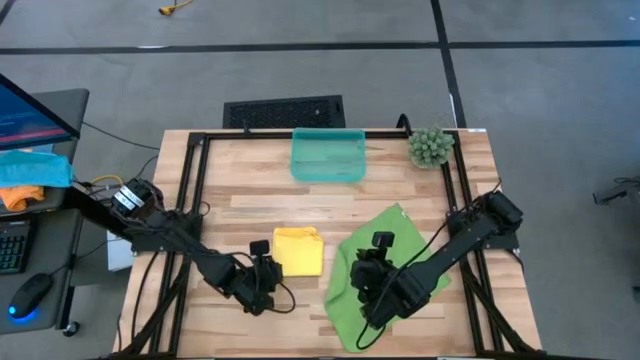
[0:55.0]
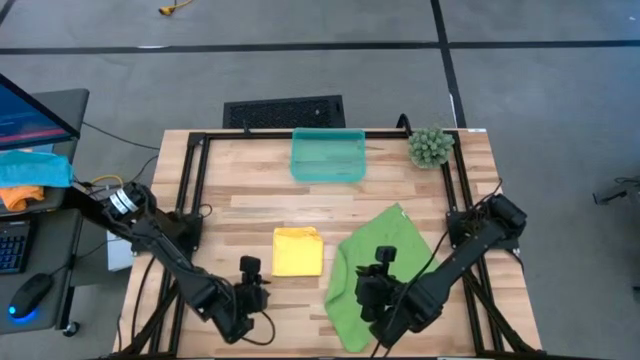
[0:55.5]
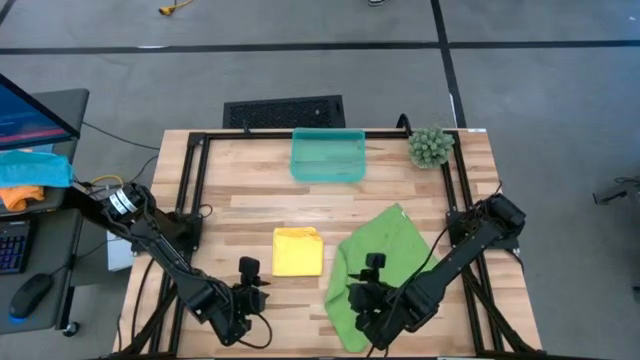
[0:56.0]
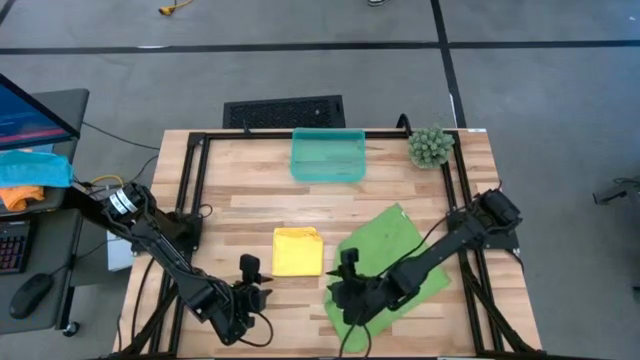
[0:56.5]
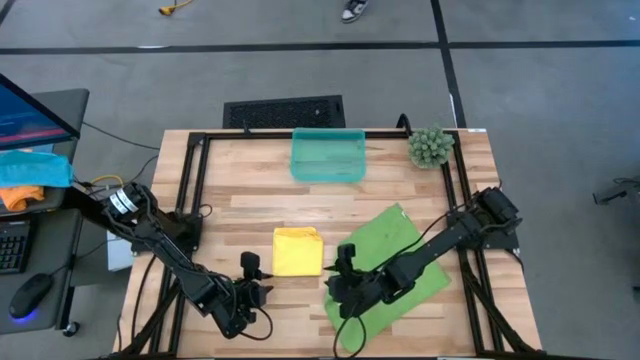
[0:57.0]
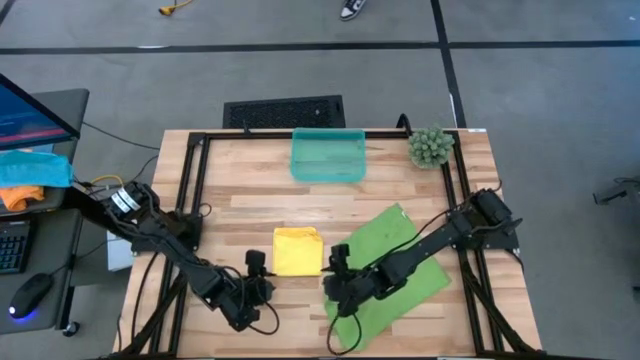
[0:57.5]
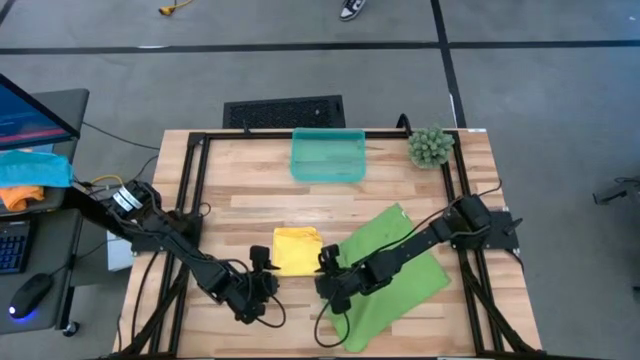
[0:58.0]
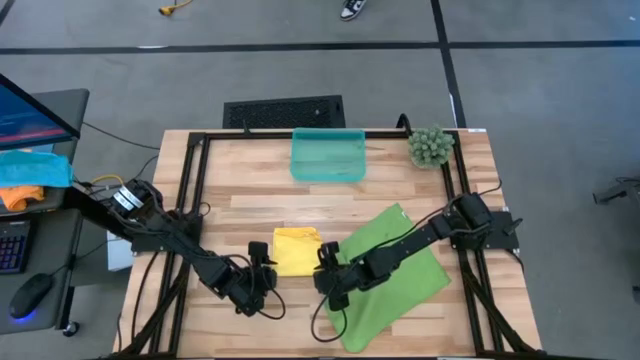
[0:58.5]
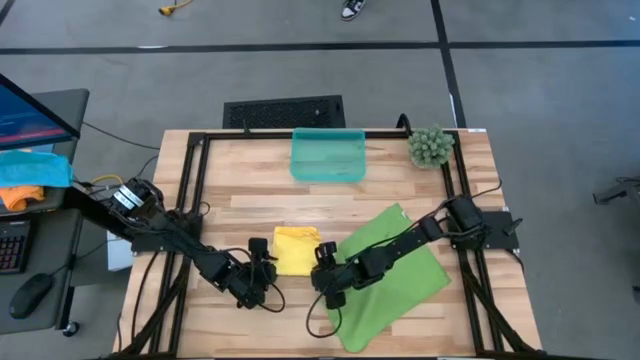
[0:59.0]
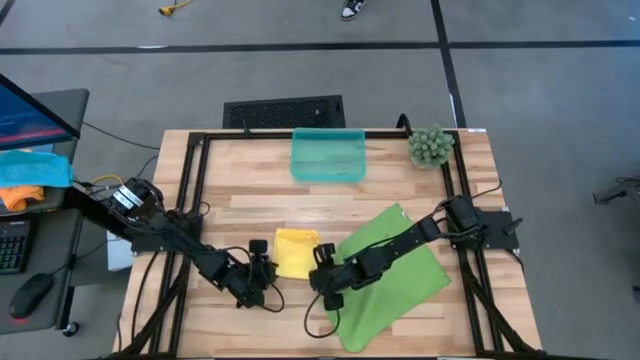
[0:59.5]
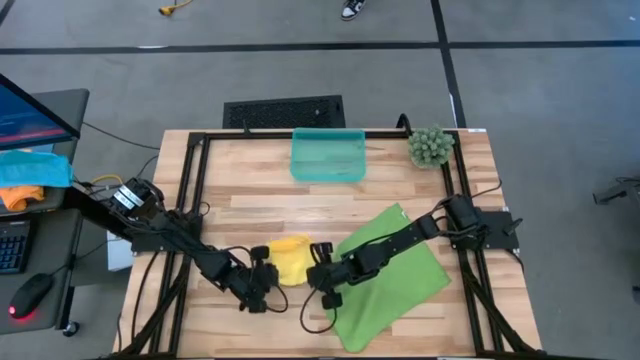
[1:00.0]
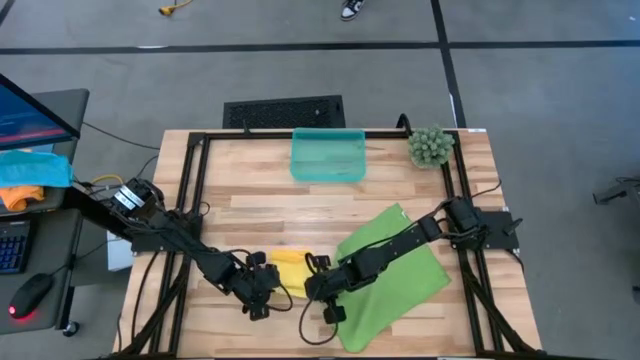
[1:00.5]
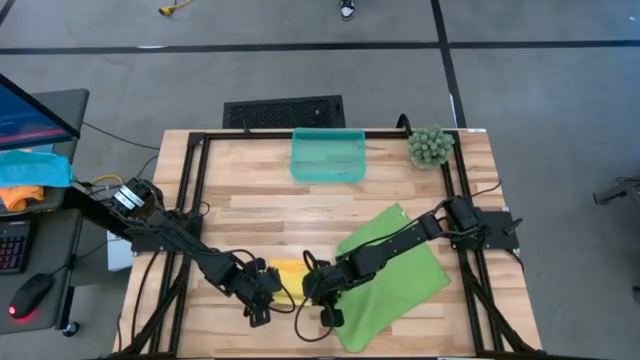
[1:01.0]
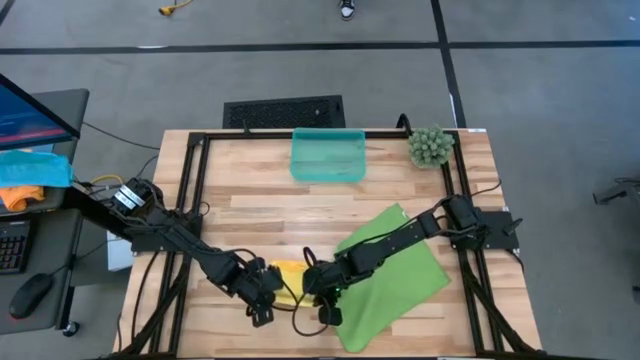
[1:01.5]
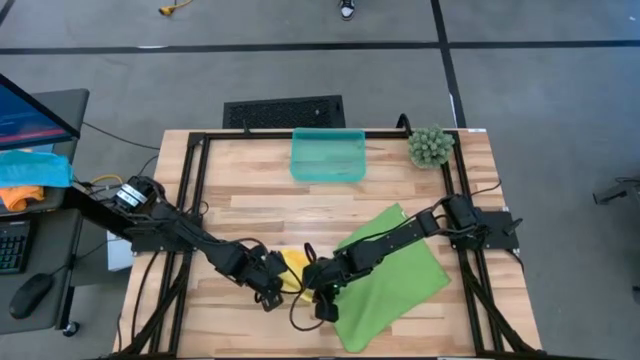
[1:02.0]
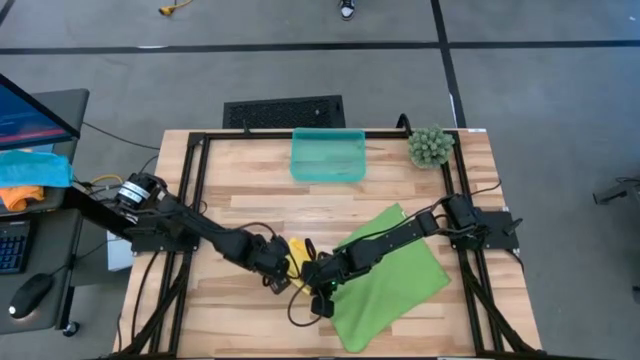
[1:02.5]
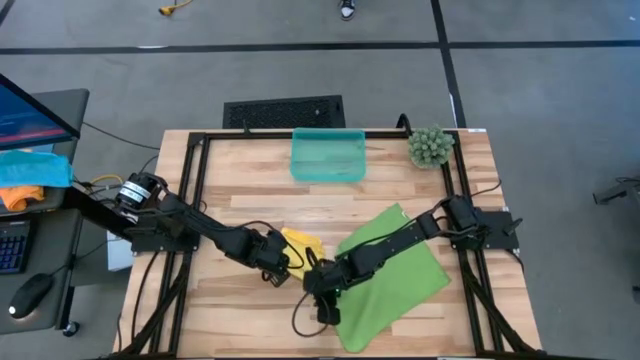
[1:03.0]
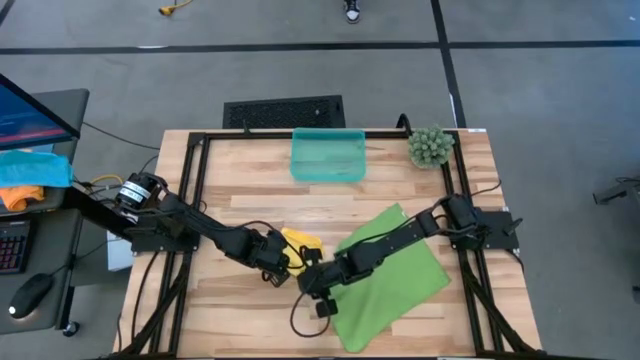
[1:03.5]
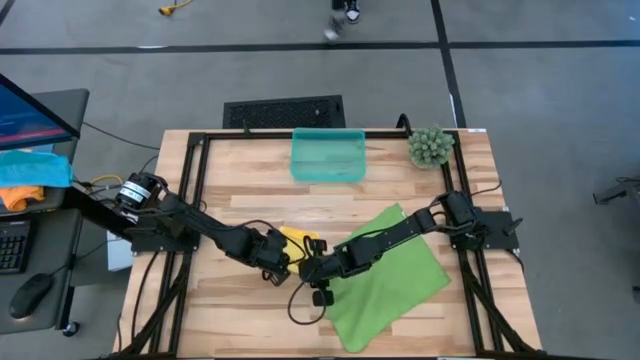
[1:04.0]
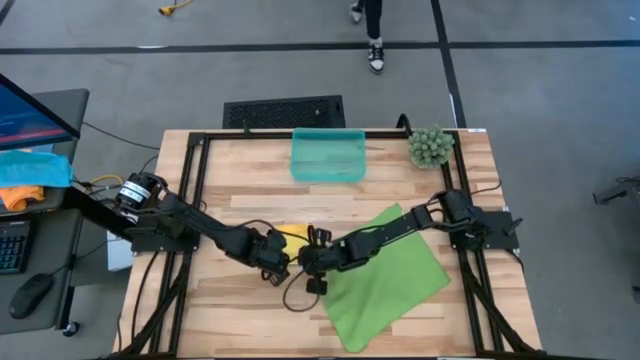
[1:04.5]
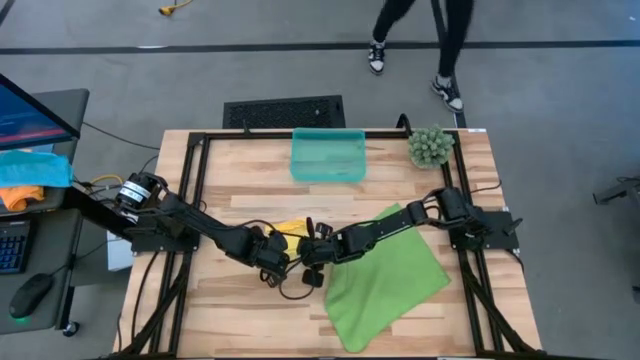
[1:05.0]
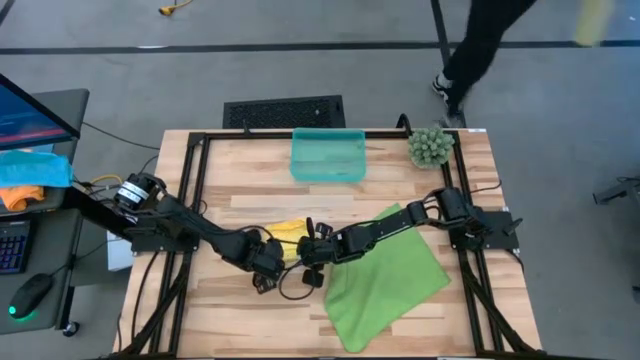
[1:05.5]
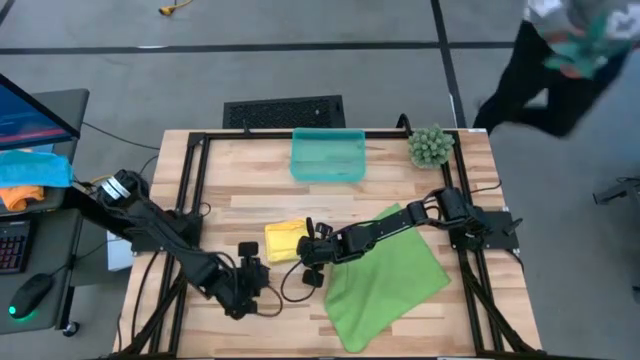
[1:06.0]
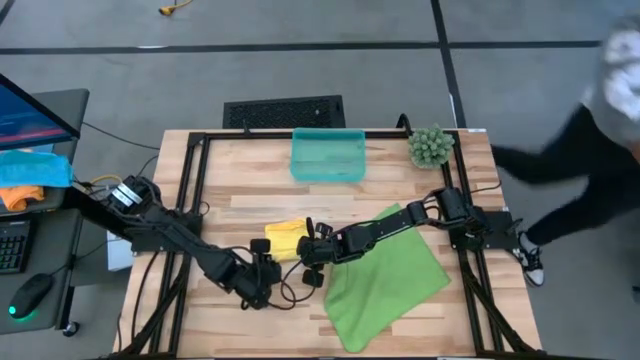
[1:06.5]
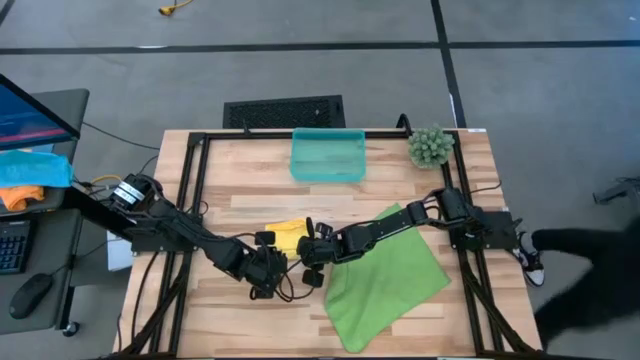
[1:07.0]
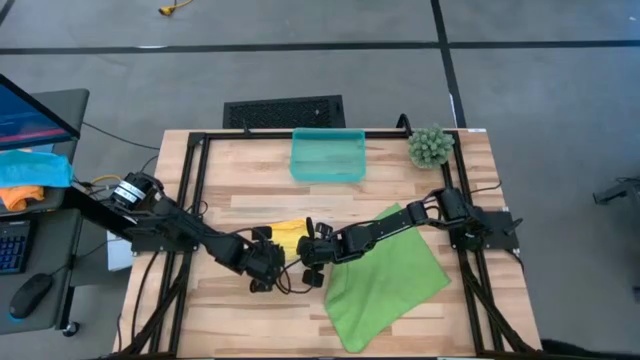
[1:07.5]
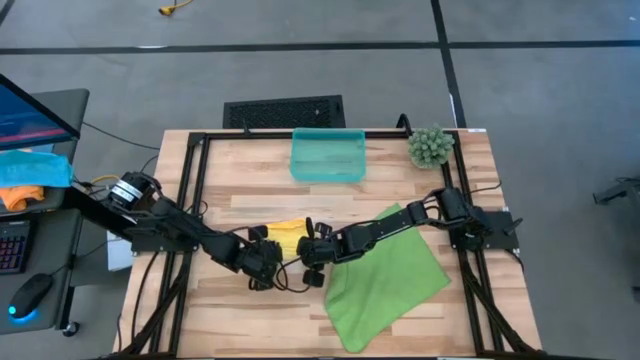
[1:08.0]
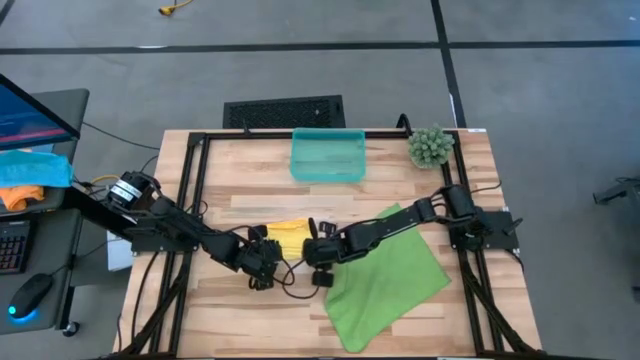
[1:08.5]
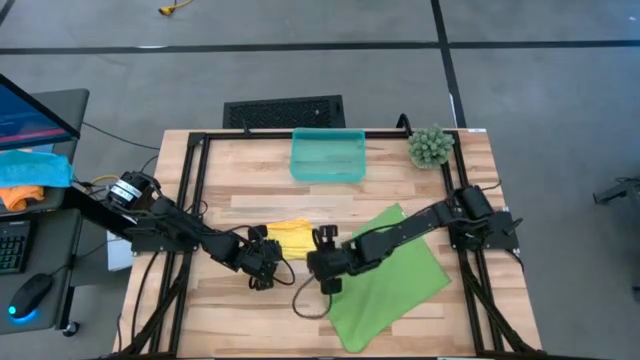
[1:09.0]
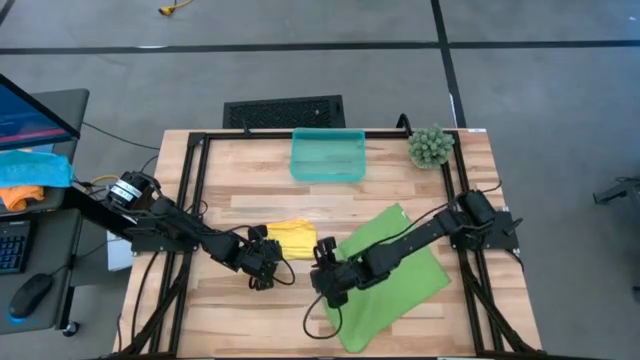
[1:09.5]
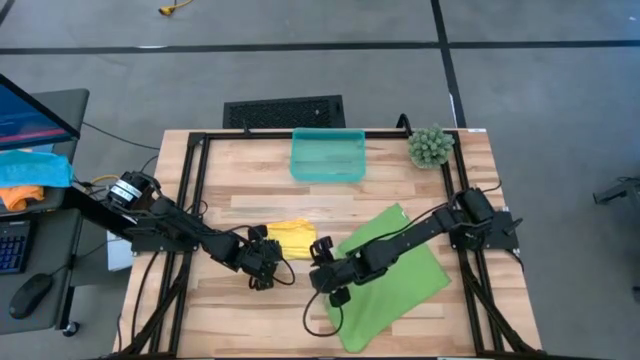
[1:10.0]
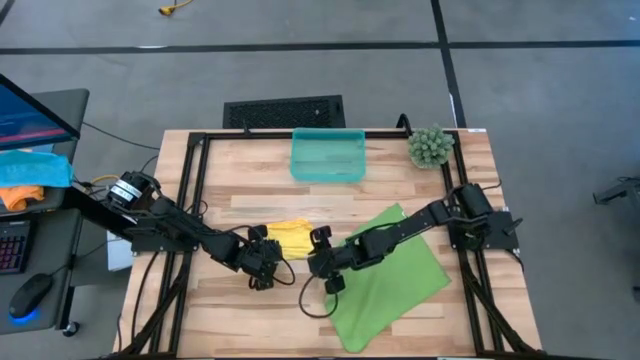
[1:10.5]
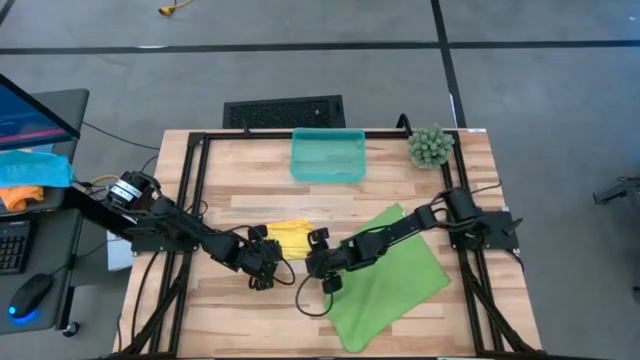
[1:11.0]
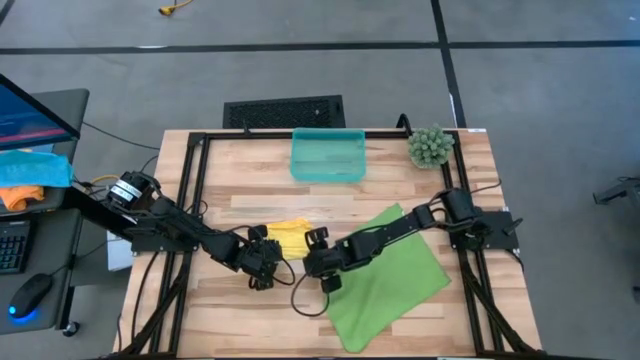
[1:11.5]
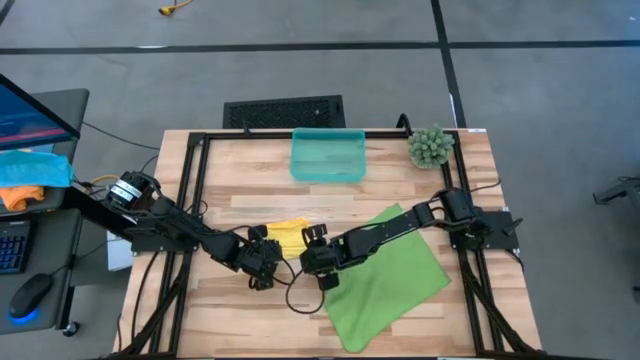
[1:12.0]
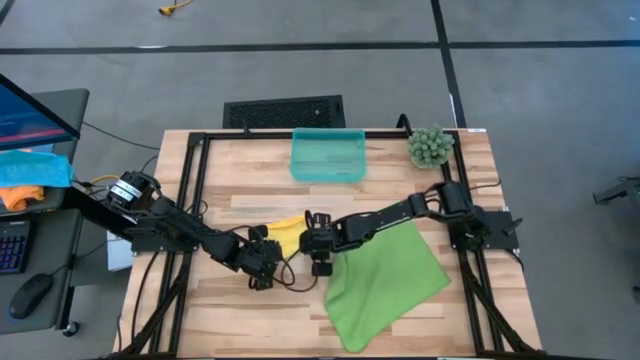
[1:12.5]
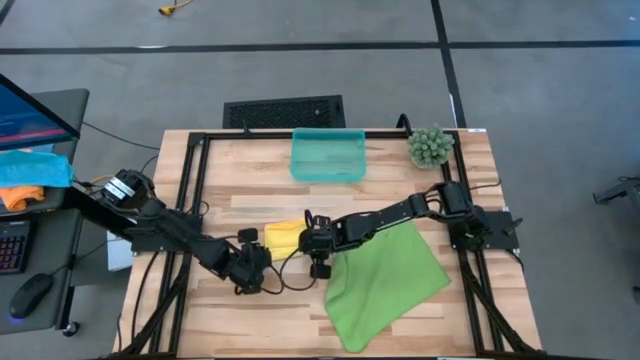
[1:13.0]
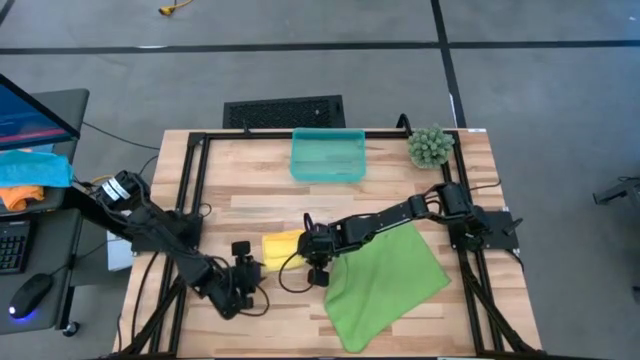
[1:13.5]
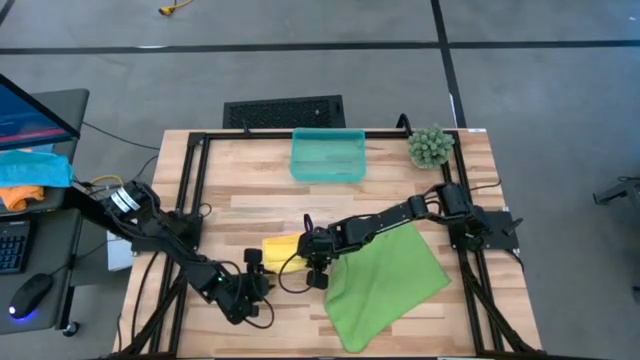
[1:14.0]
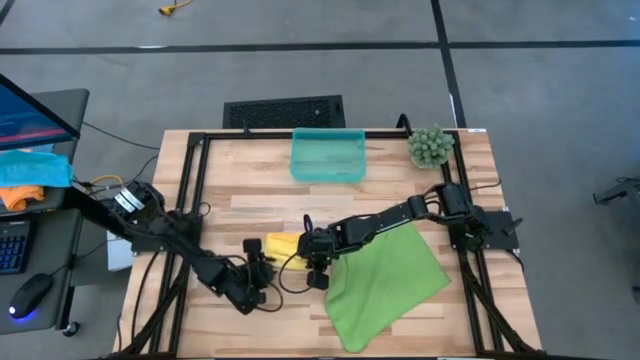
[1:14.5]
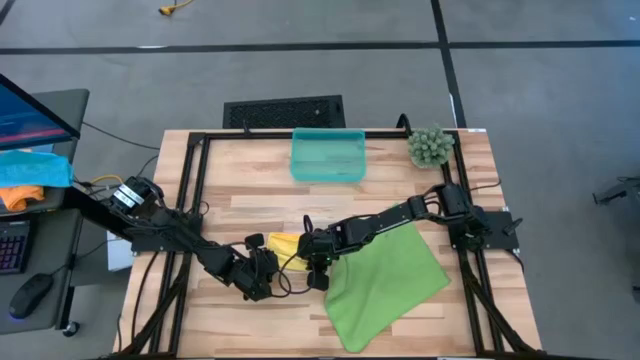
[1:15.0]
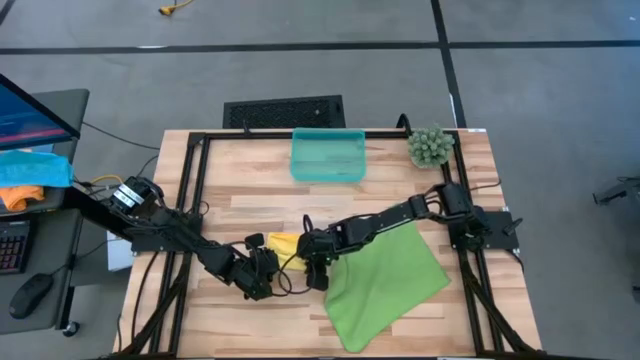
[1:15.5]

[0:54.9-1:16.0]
Task: Roll microfiber towels into tight, uniform cylinder then place into a basket
Roll the yellow microfiber towel

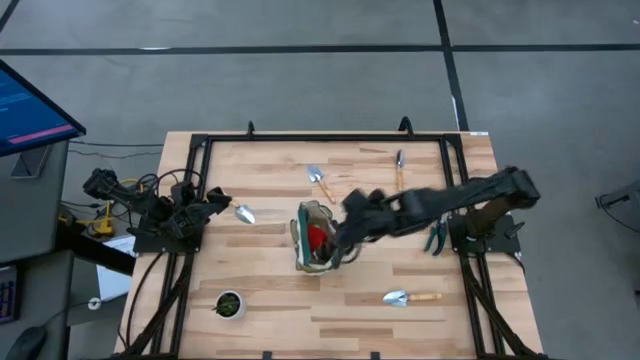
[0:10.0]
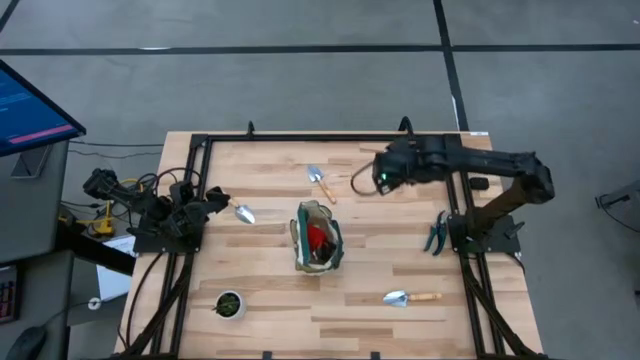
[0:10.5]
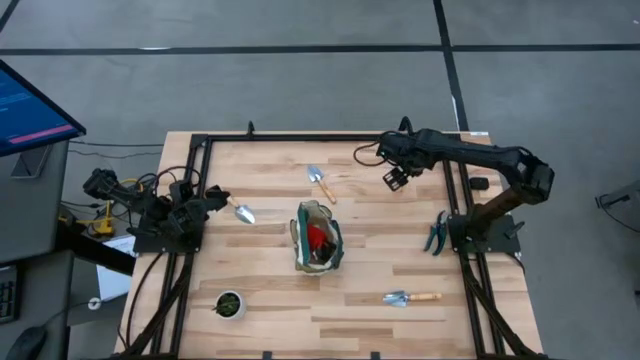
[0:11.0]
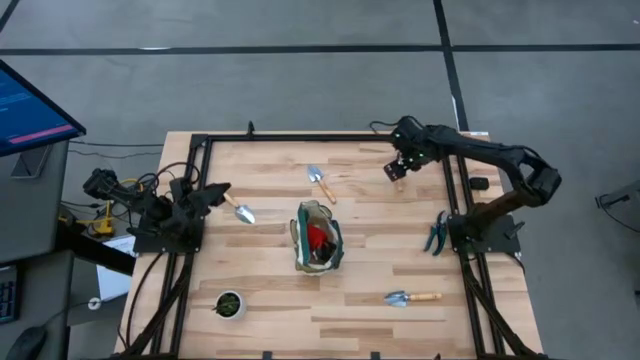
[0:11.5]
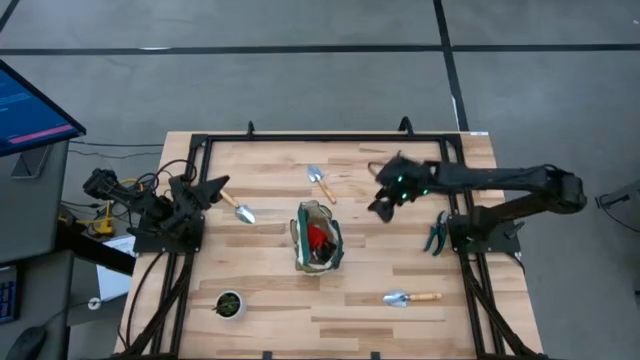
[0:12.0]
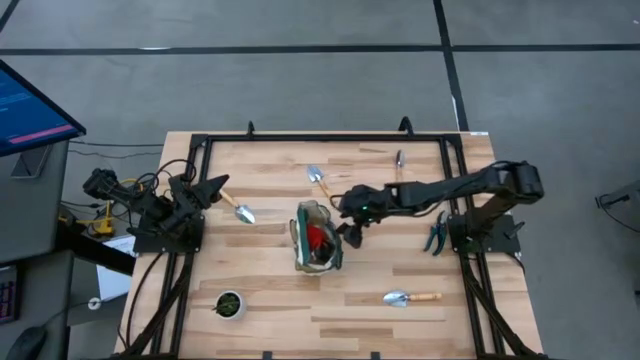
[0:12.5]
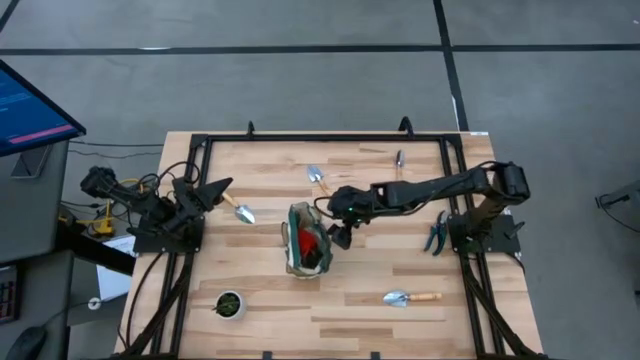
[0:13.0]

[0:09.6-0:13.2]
Task: Pick & Place Garden tools in Gardening bag
Adjust the green bag
